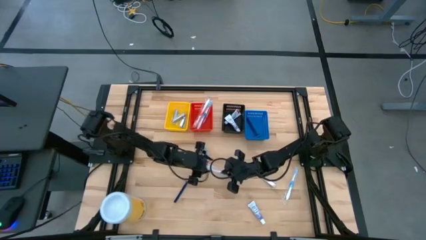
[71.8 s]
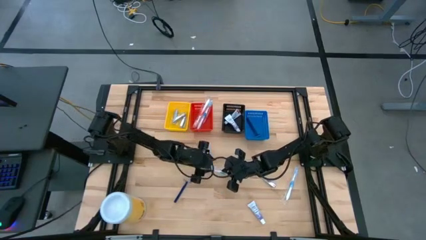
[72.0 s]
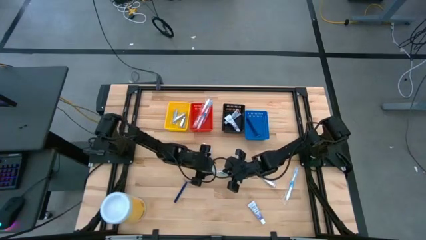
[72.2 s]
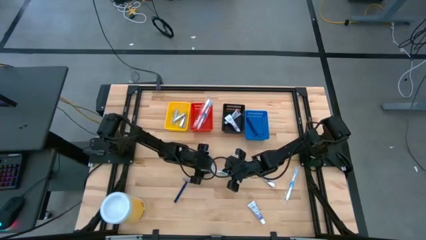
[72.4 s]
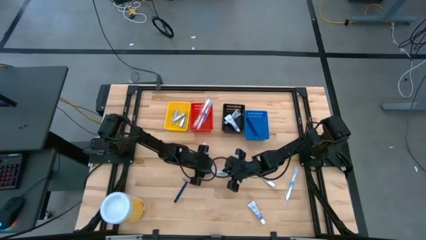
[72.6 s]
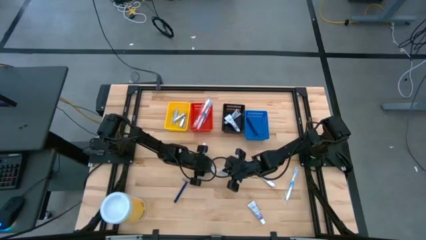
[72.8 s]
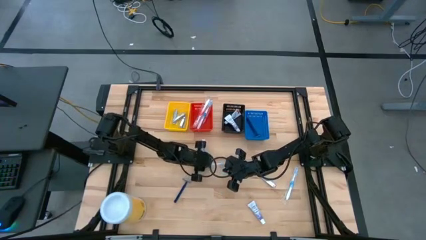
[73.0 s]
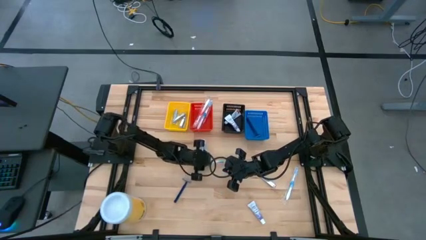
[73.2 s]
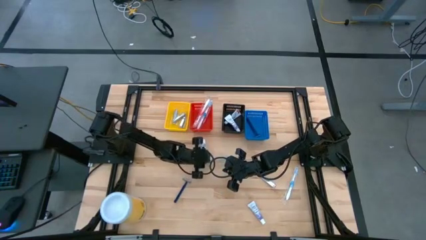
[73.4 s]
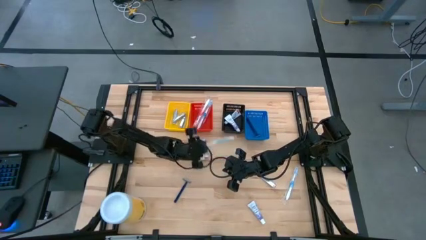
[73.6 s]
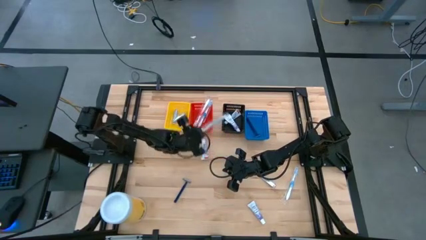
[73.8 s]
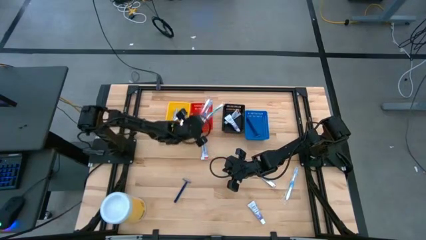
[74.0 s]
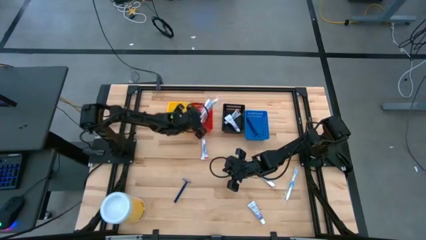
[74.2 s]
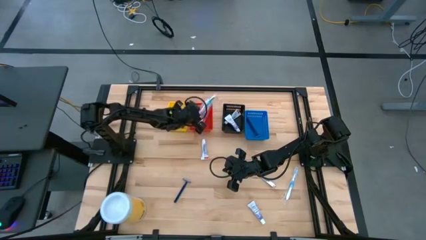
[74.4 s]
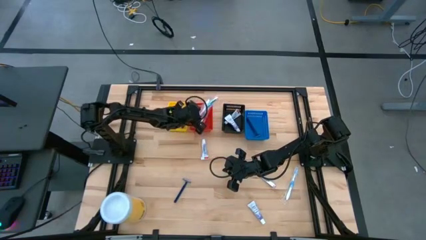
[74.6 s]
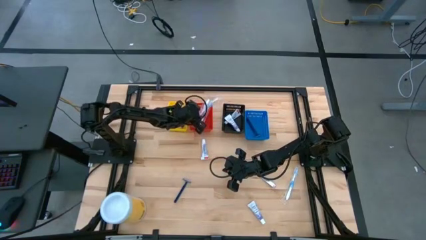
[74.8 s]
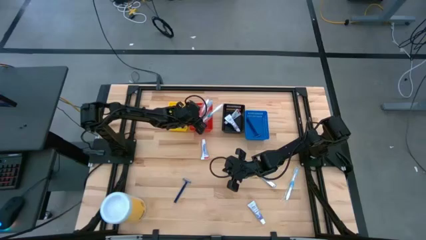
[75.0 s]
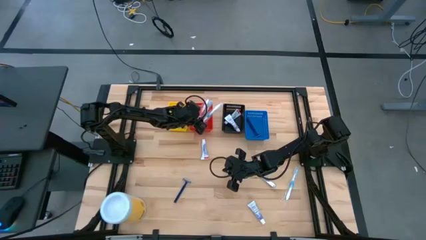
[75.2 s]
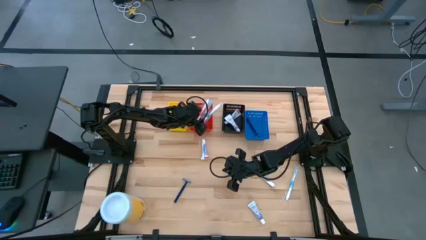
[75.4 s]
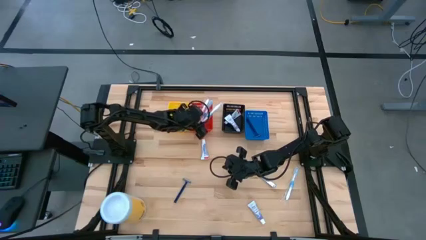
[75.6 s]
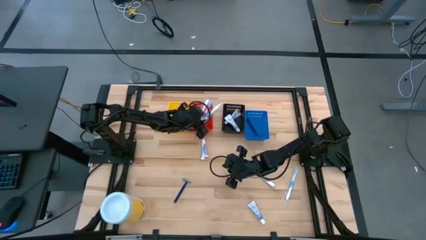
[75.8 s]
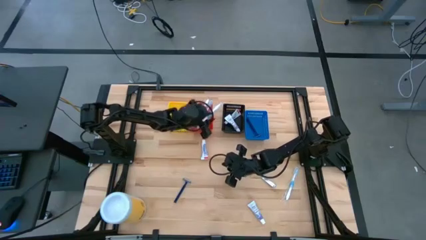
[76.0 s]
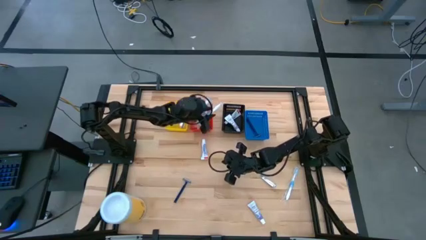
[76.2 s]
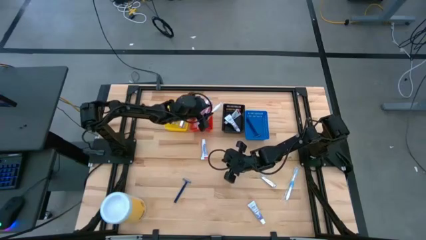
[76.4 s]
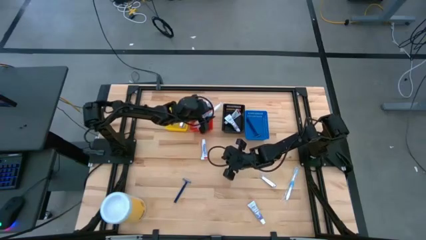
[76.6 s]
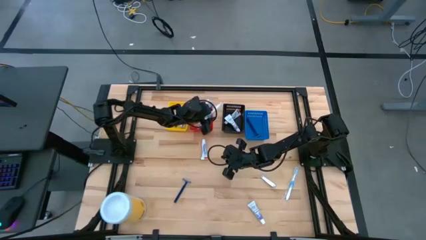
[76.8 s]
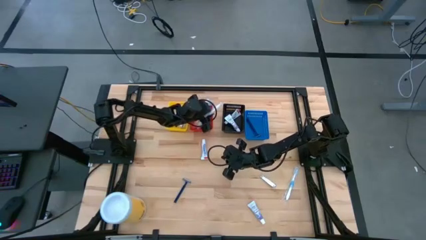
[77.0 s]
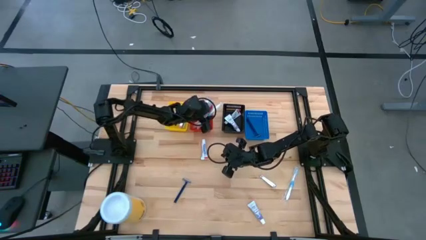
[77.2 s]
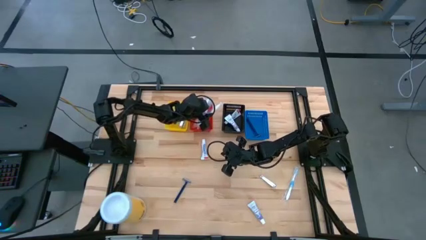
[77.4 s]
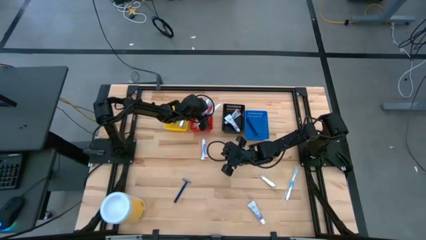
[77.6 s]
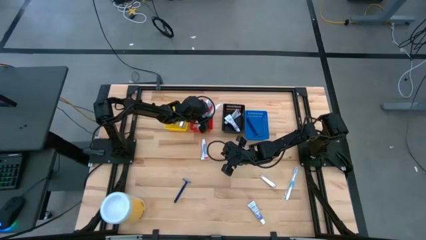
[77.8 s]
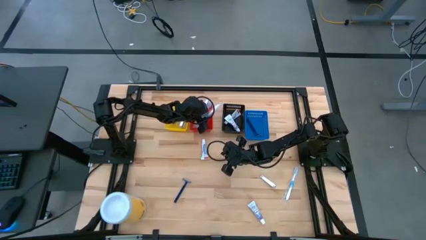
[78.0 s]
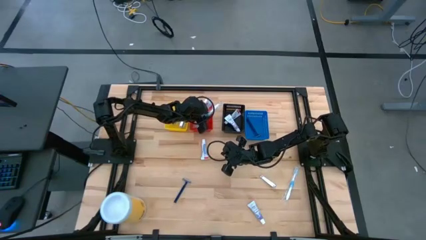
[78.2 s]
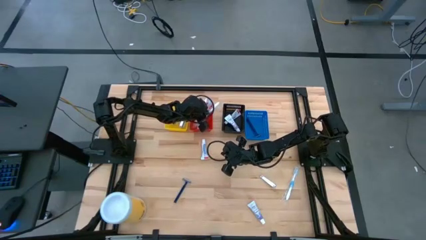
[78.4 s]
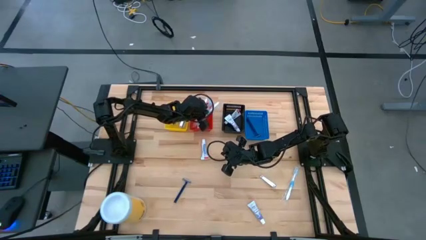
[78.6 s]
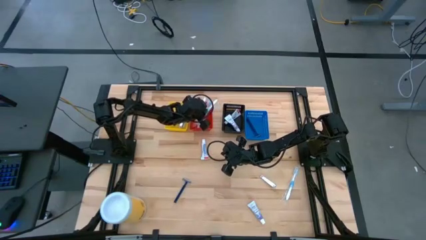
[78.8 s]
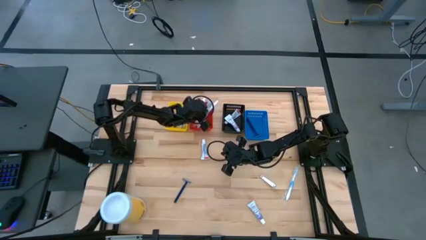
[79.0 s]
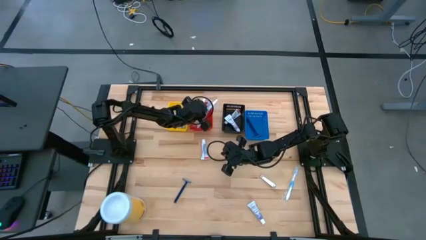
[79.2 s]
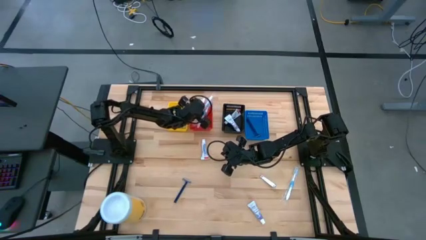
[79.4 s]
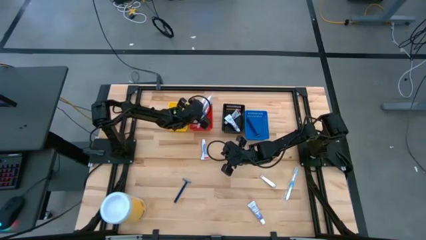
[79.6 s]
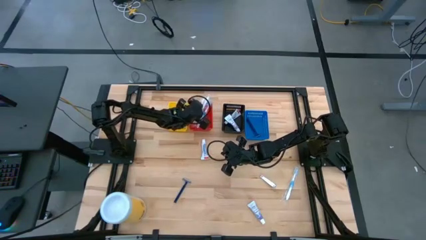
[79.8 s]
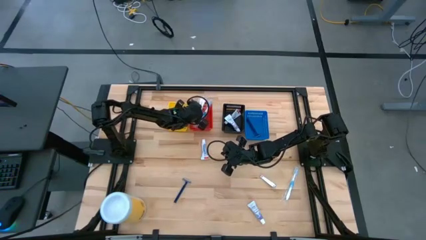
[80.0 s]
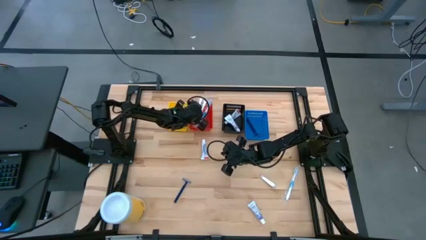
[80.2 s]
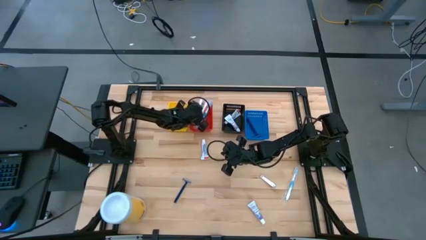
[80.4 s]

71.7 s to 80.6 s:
Task: Pick & Place Travel size toiletries
Put the green toothbrush into the red bin

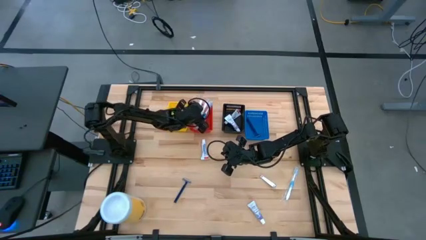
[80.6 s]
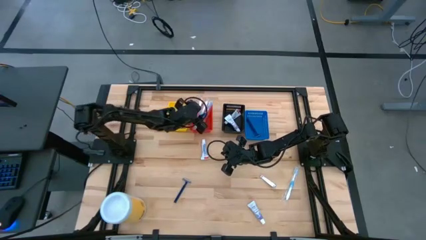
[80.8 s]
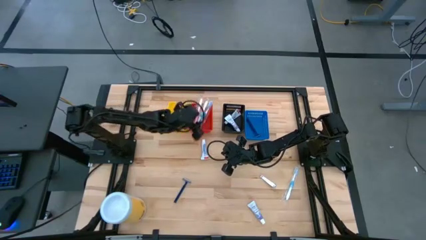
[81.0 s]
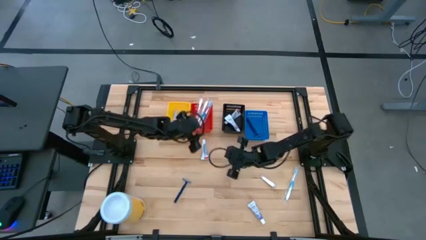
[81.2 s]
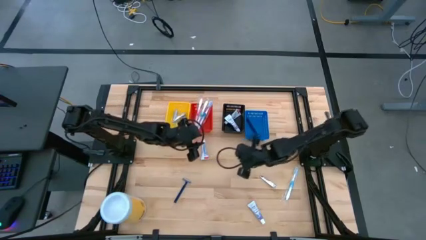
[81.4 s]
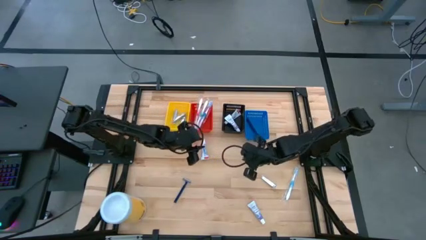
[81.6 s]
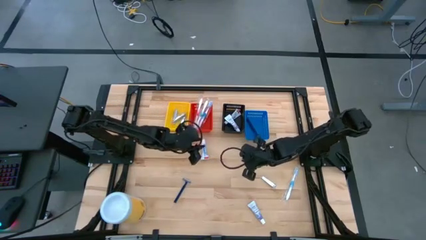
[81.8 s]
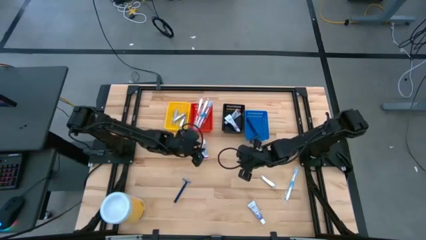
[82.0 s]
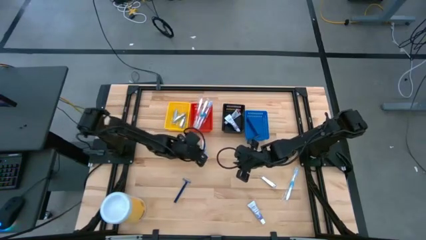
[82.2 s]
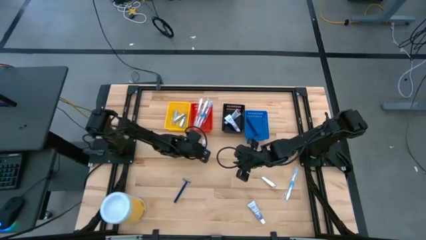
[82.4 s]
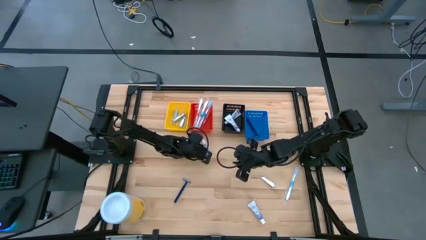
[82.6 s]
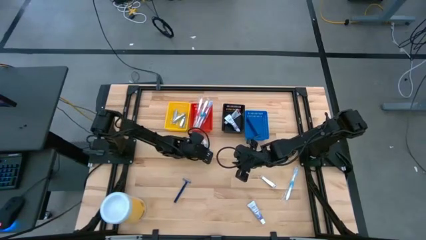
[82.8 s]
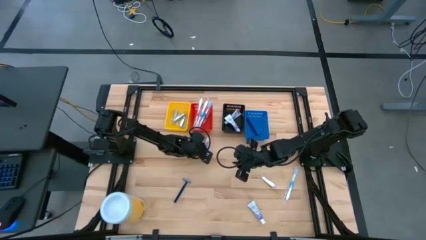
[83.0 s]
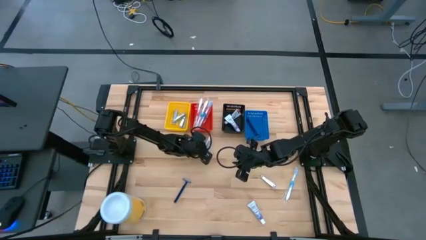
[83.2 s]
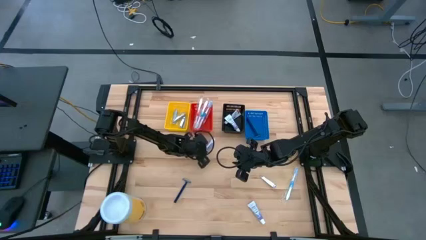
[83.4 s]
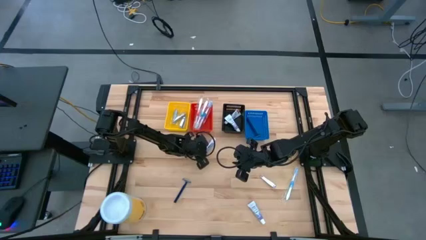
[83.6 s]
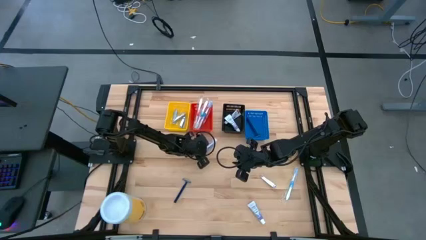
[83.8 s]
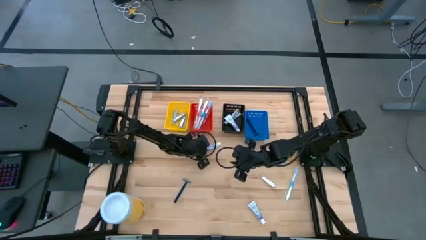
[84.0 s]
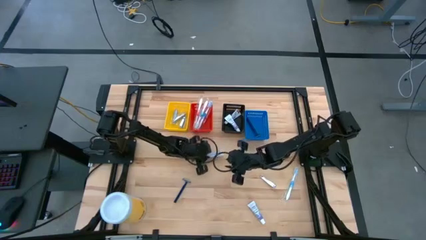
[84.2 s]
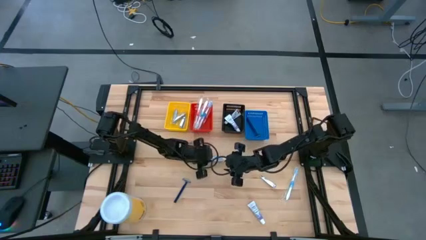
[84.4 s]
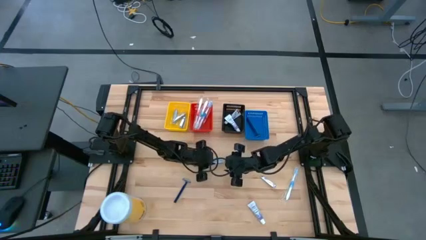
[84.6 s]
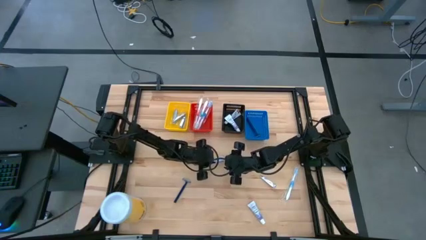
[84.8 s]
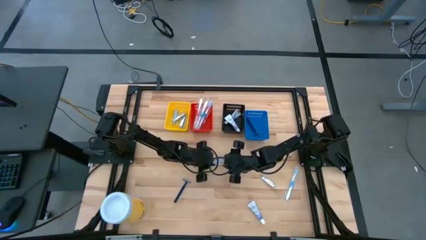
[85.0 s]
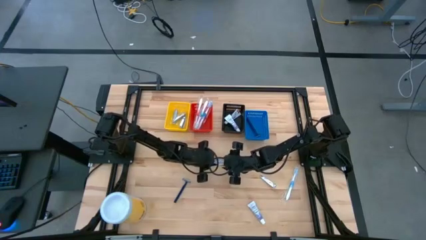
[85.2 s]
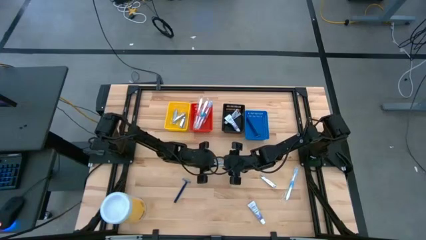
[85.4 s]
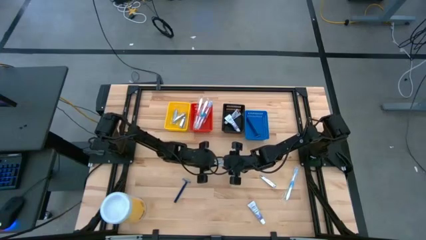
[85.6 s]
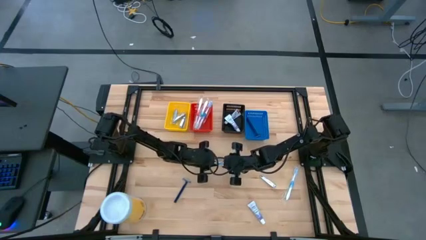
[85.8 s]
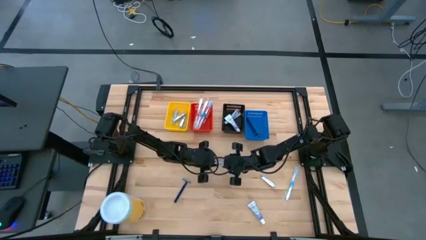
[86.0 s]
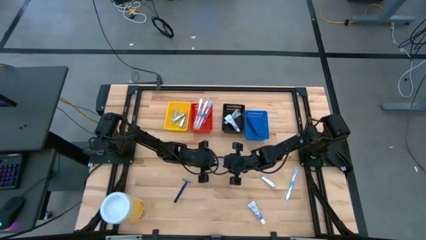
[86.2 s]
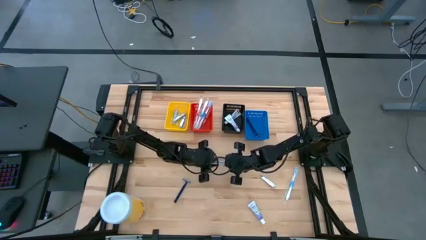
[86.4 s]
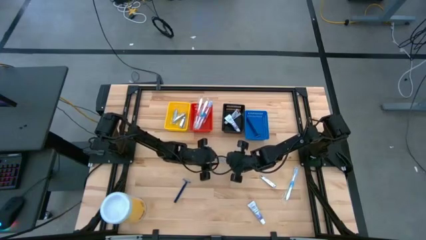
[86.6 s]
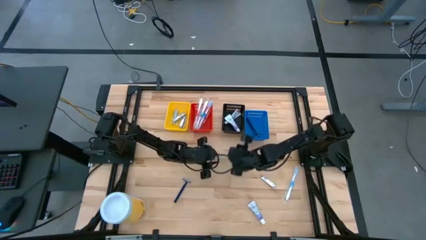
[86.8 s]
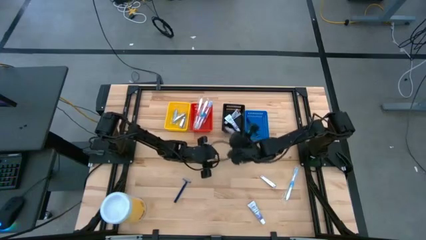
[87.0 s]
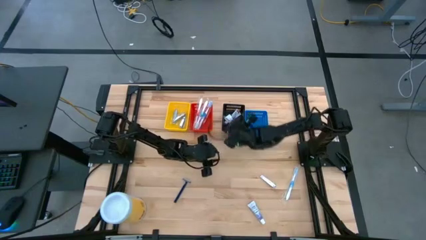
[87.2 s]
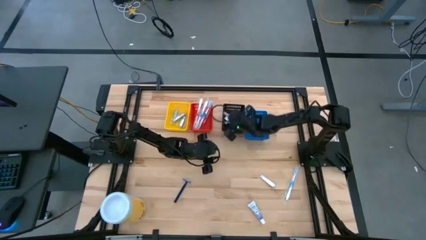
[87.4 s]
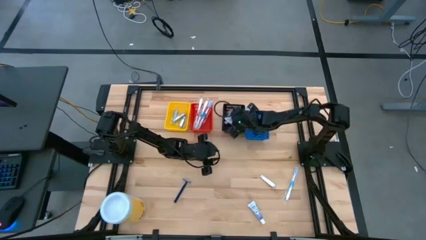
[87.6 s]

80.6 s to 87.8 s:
Put the white toothpaste into the black bin
